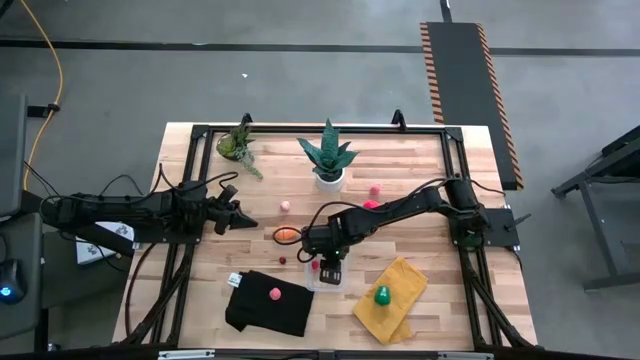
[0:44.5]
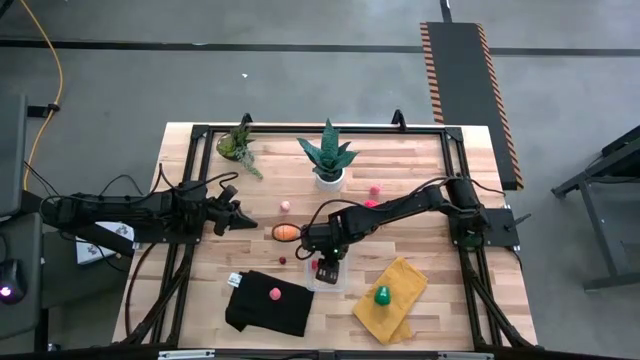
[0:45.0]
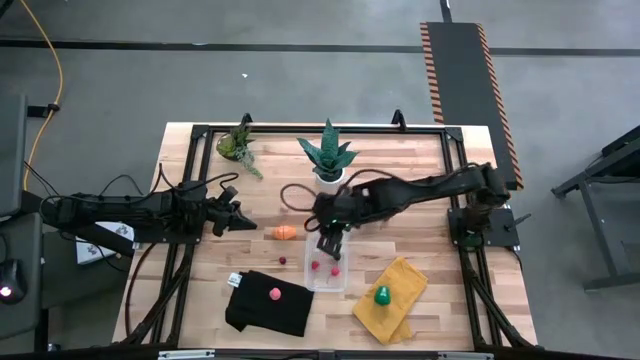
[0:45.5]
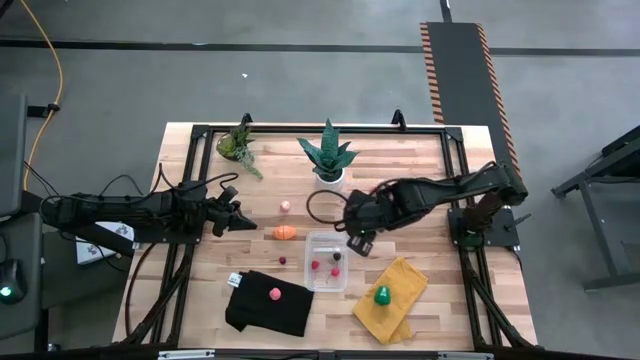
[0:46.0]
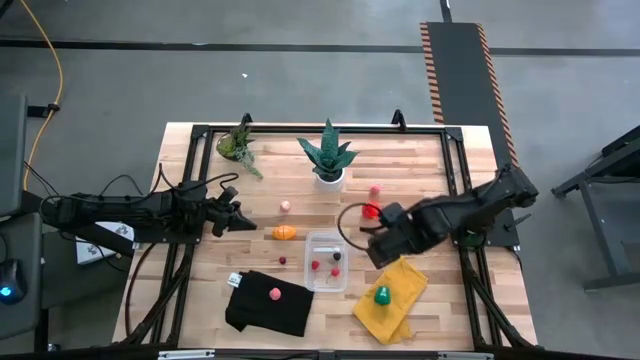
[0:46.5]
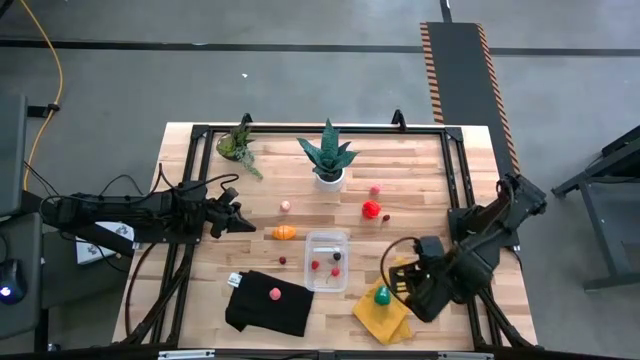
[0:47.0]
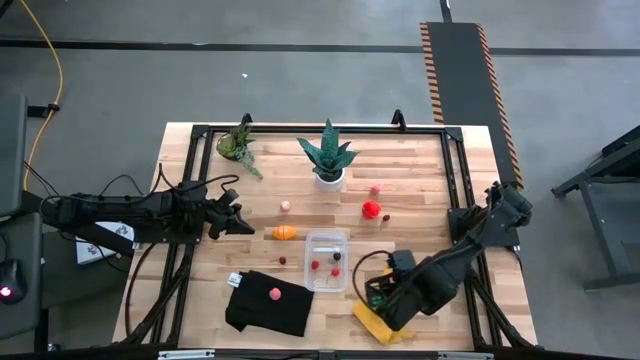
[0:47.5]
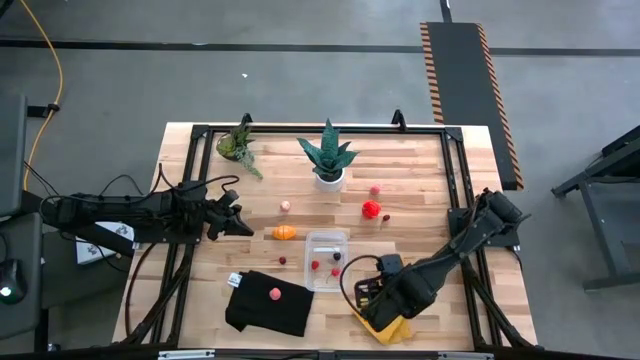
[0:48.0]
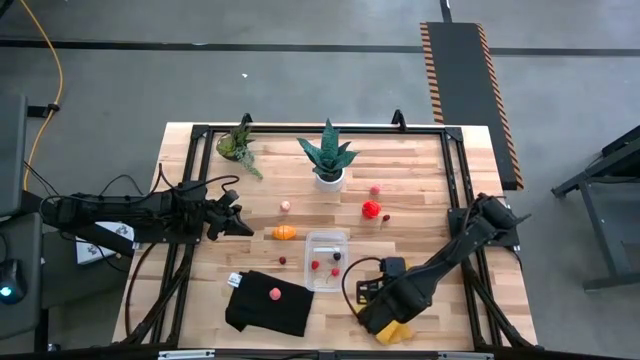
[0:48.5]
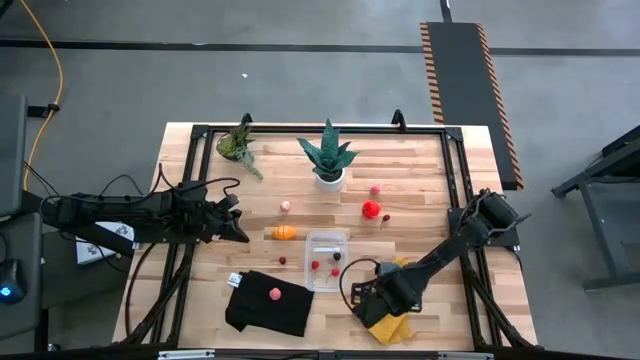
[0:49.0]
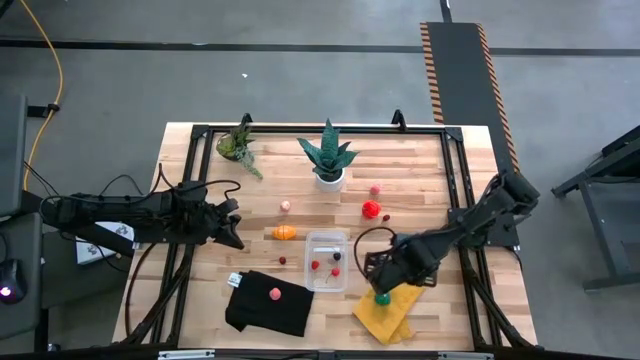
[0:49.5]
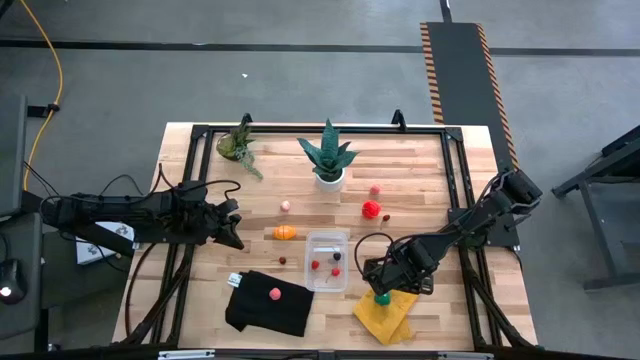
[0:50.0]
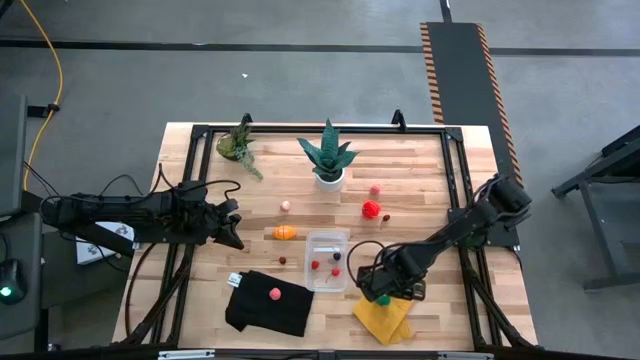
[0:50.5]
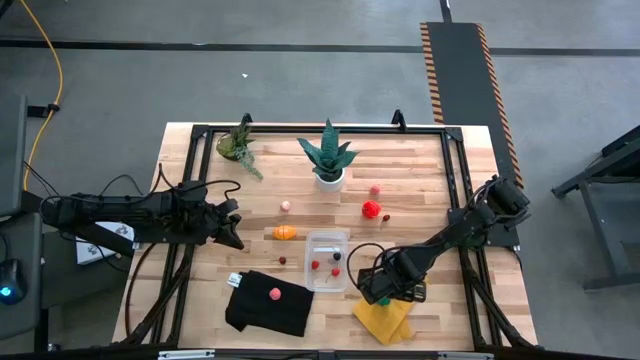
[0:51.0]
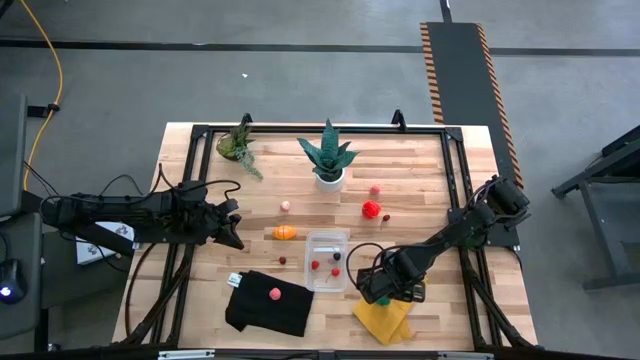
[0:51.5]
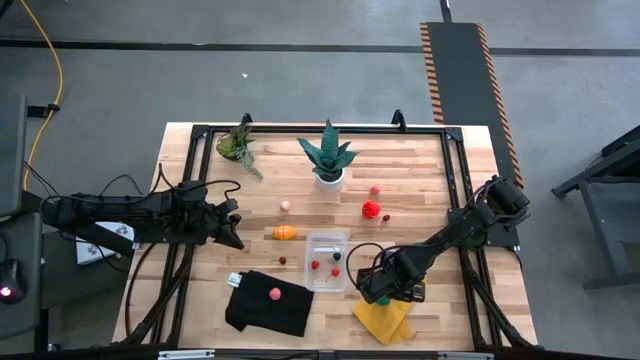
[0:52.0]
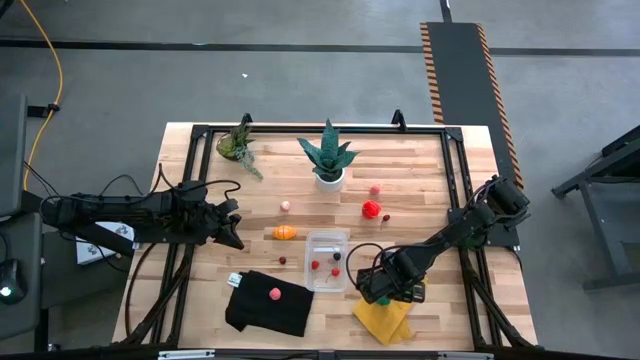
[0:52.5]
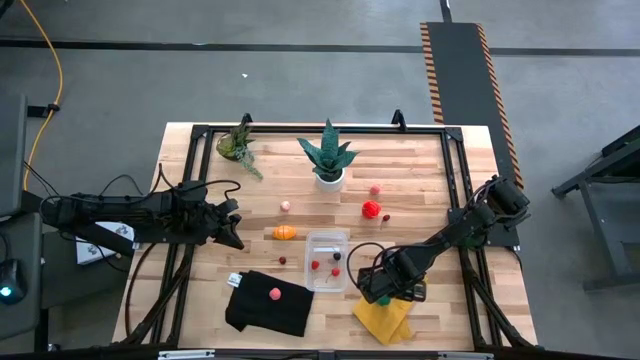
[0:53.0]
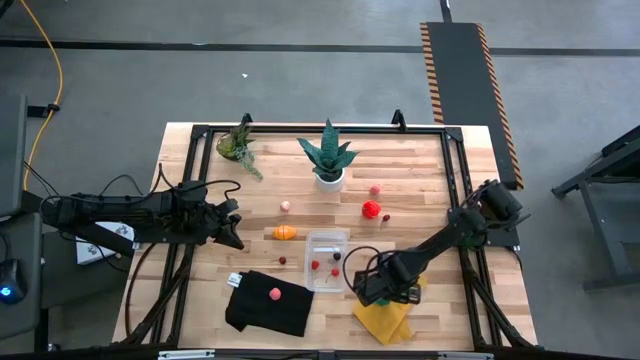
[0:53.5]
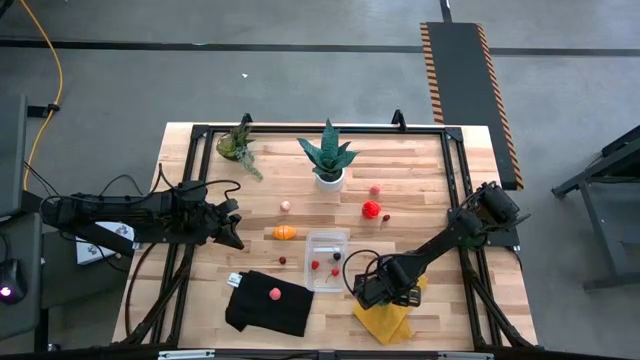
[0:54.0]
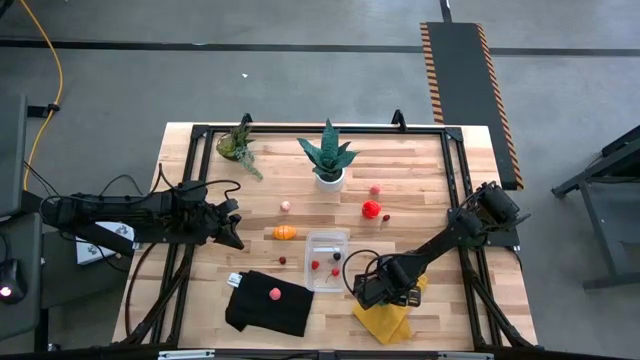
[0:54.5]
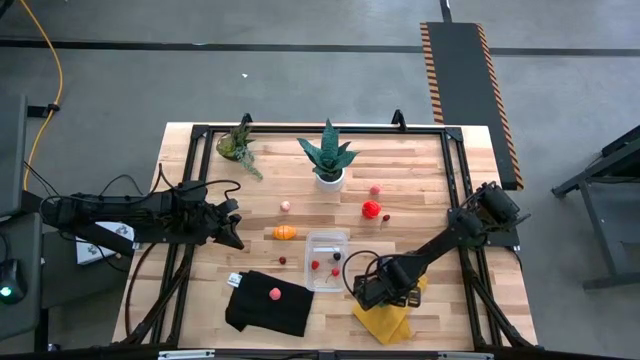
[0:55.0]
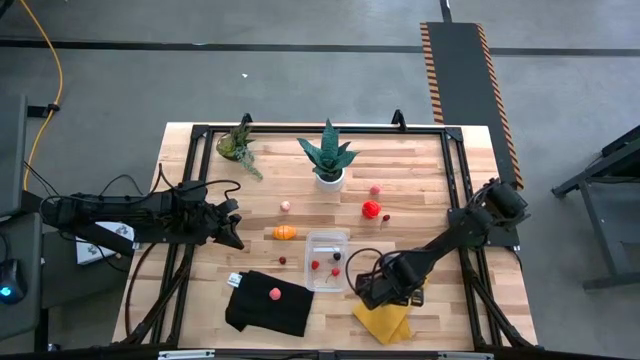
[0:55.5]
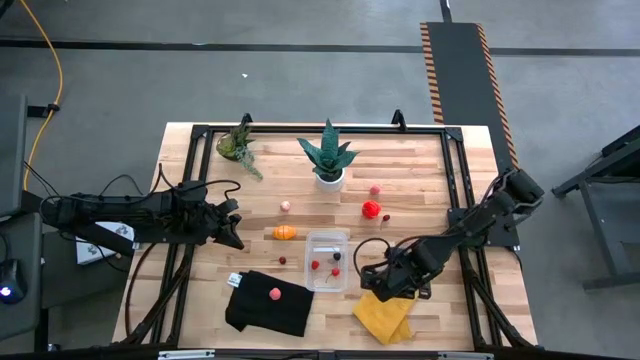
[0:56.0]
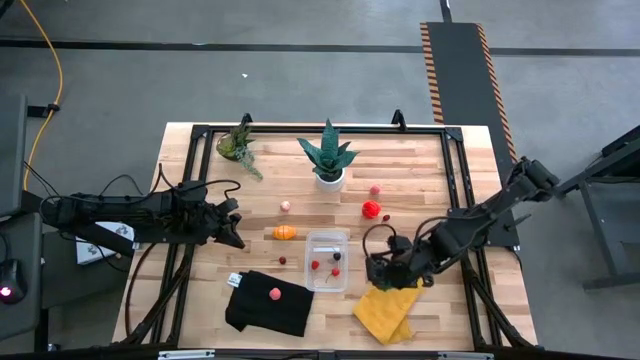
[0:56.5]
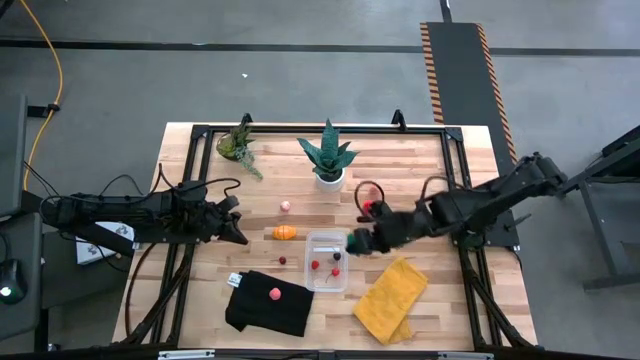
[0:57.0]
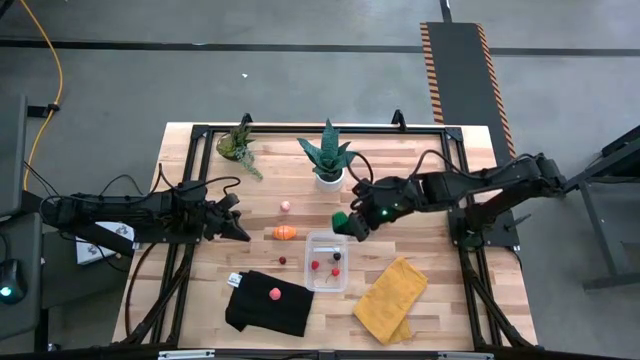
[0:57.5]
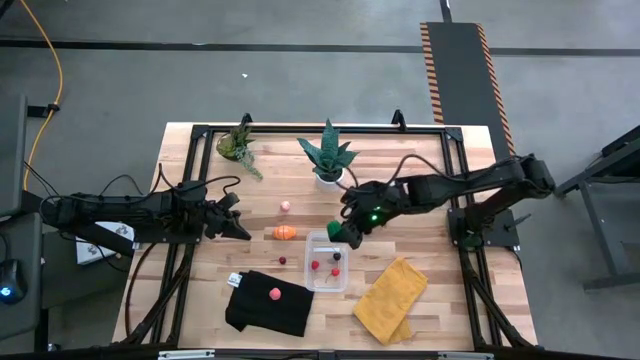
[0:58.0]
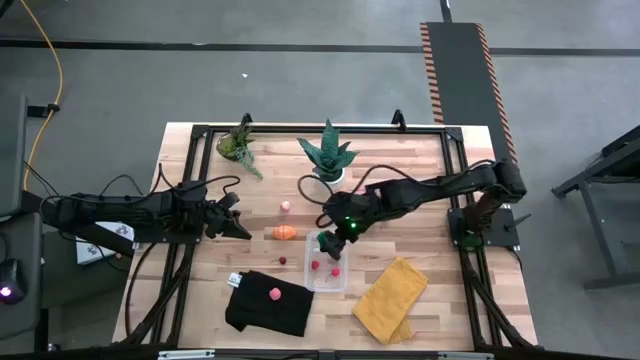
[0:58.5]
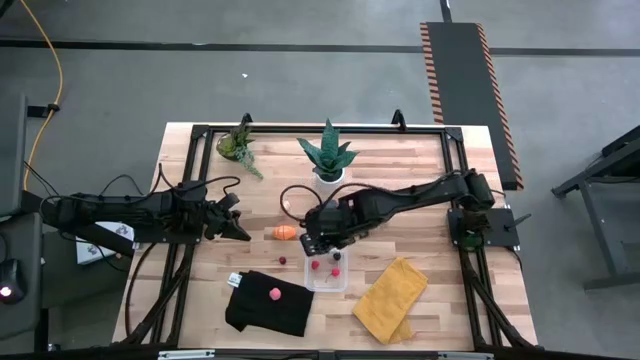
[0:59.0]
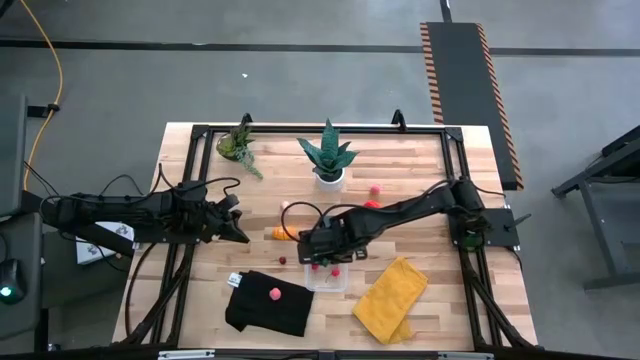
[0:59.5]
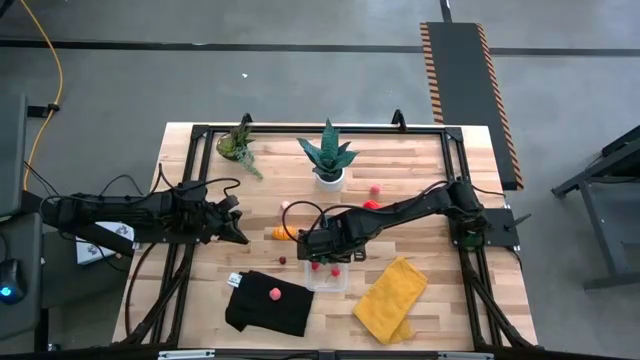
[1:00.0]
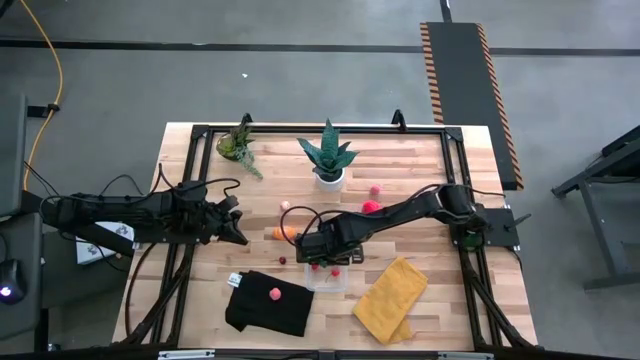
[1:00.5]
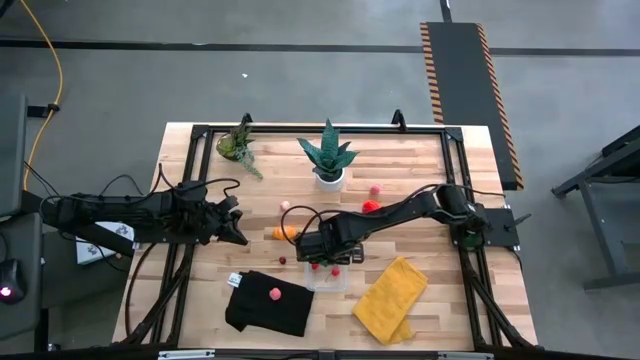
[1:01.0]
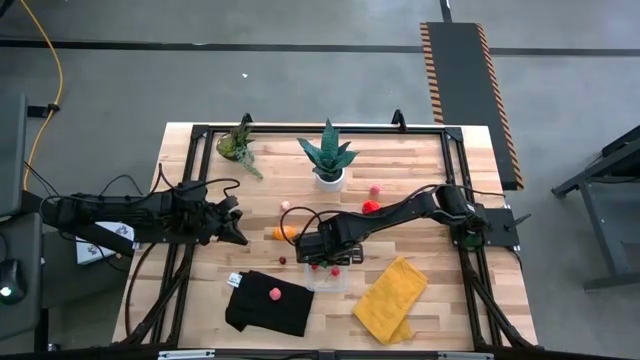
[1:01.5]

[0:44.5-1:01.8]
Task: Pick and placing Produce into tupperware
Put the bell pepper into the transparent container

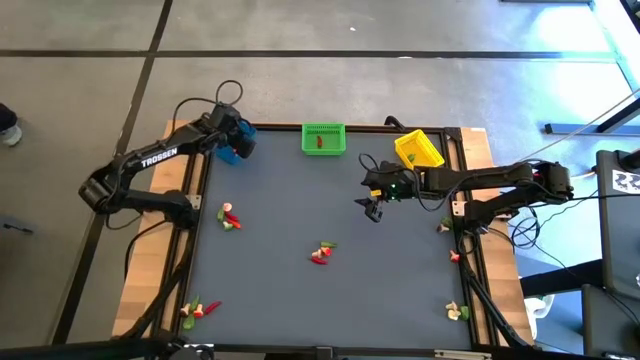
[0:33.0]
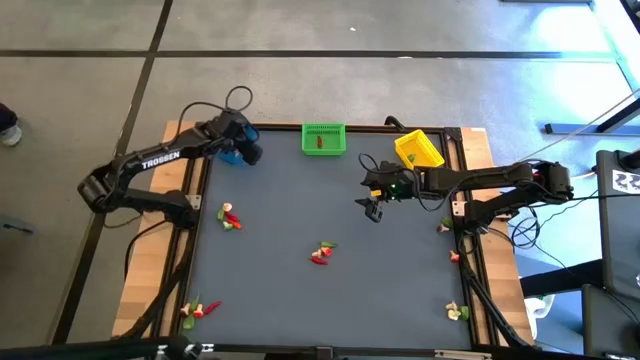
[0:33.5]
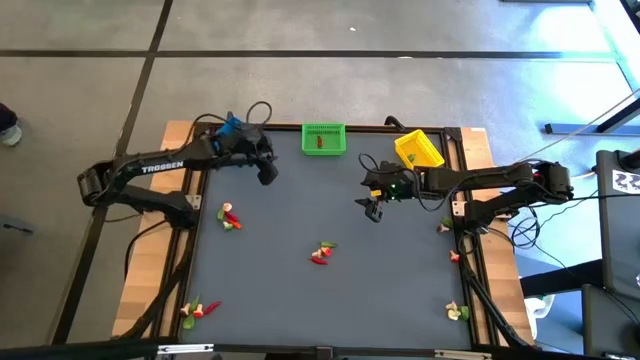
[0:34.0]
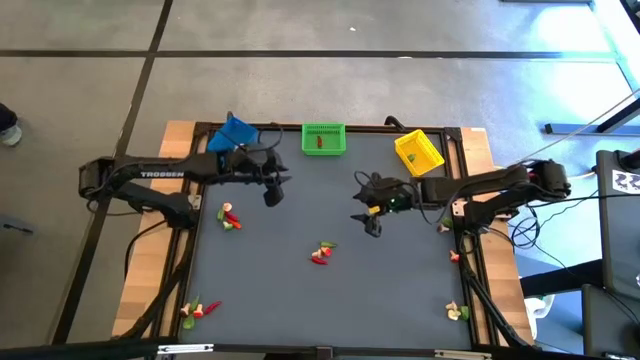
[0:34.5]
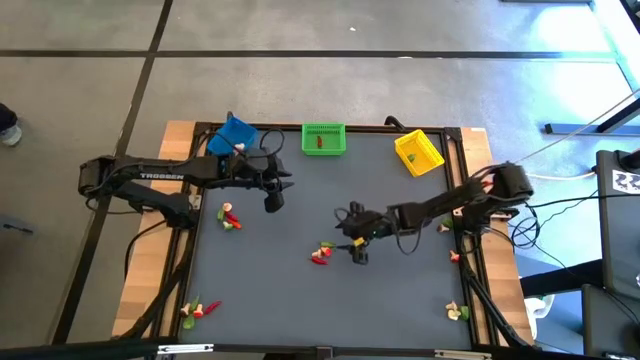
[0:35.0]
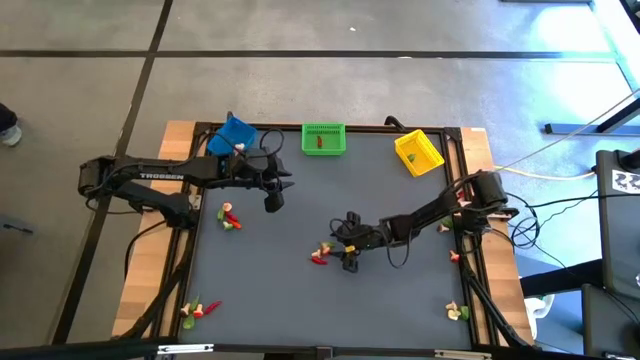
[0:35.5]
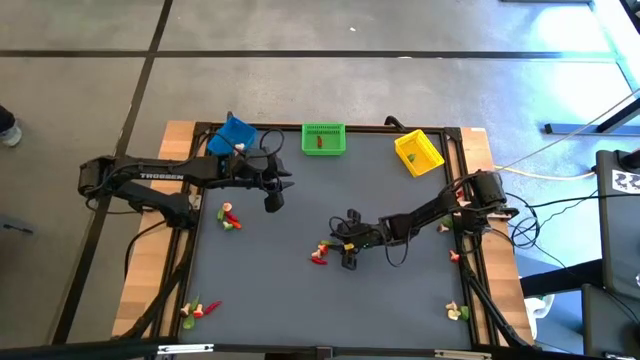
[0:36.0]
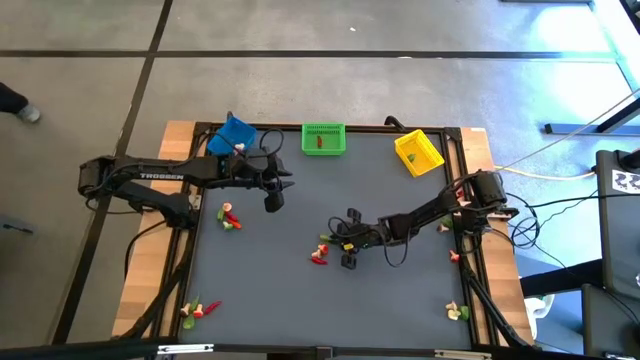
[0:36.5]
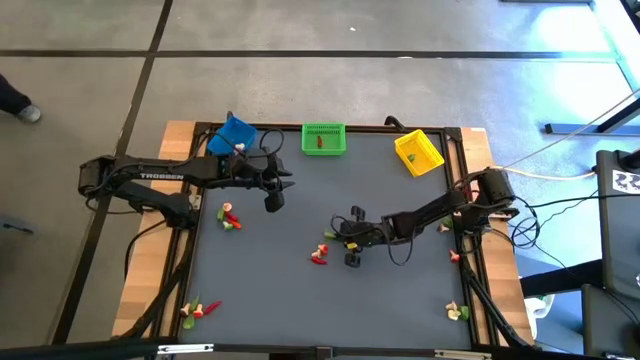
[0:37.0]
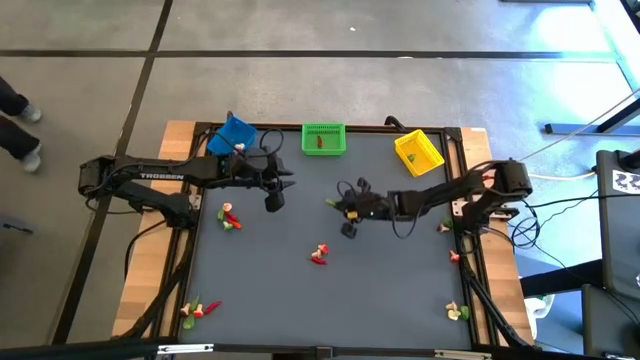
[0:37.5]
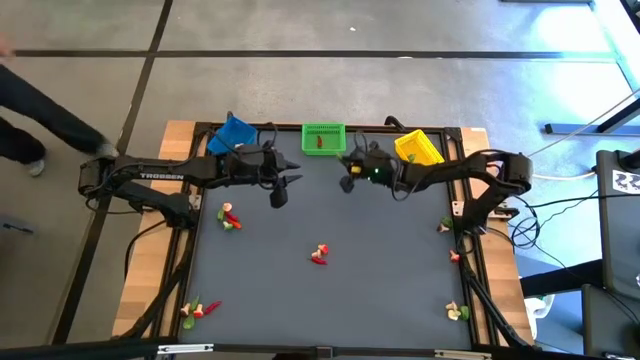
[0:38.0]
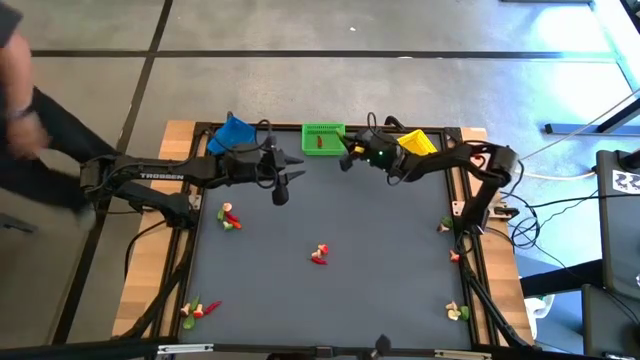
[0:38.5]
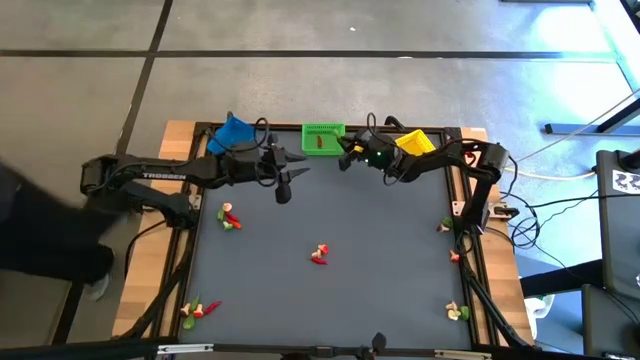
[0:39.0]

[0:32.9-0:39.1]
Task: Sort produce into baskets
Put the green pepper into the green bin
